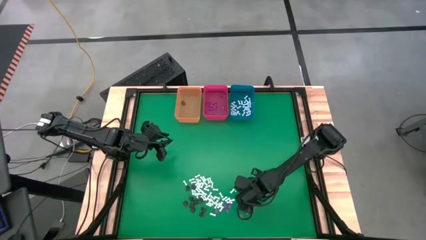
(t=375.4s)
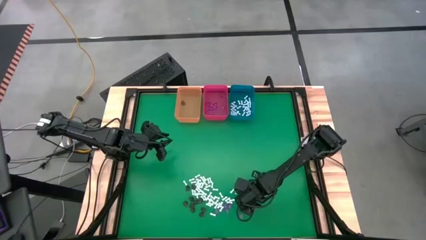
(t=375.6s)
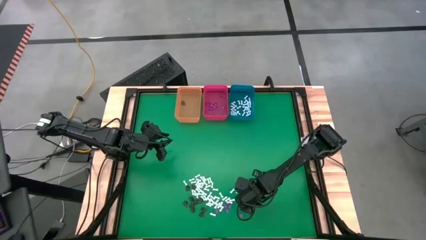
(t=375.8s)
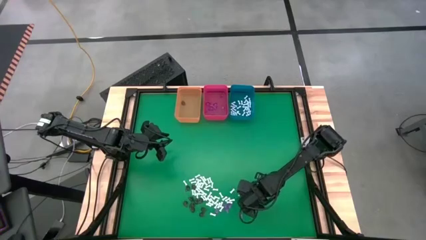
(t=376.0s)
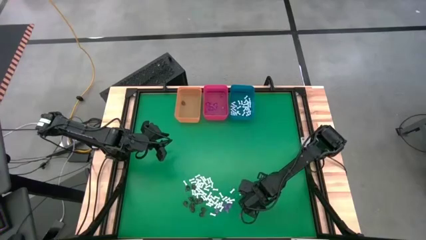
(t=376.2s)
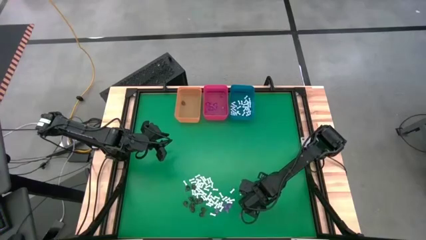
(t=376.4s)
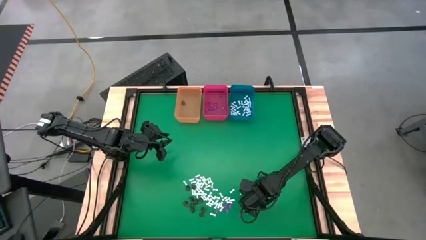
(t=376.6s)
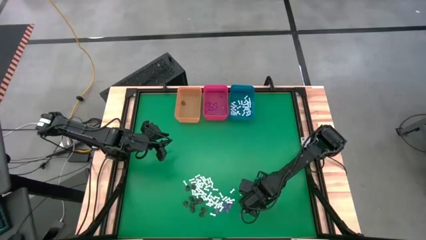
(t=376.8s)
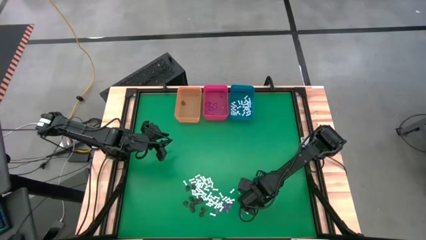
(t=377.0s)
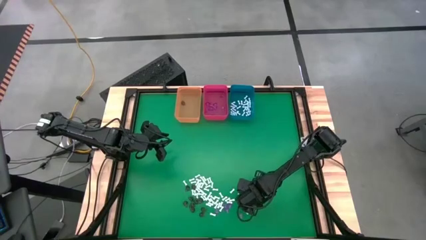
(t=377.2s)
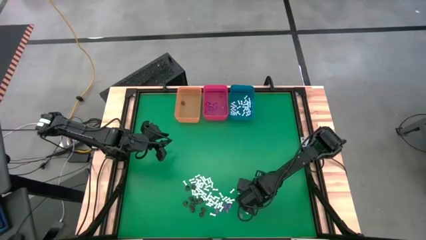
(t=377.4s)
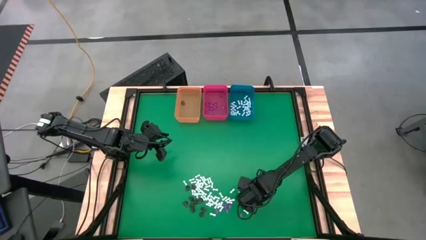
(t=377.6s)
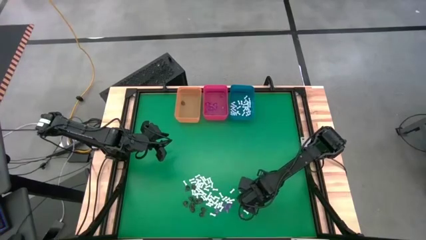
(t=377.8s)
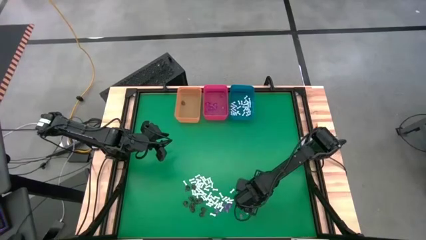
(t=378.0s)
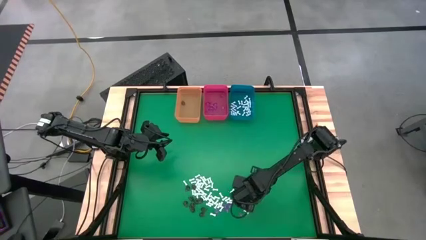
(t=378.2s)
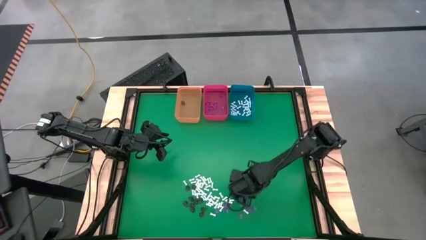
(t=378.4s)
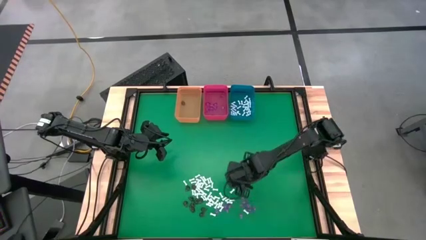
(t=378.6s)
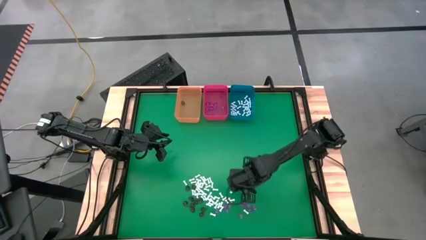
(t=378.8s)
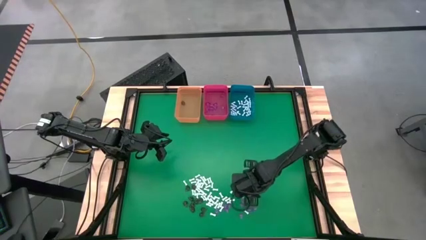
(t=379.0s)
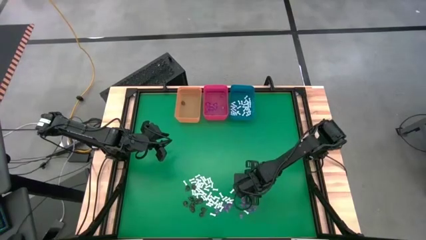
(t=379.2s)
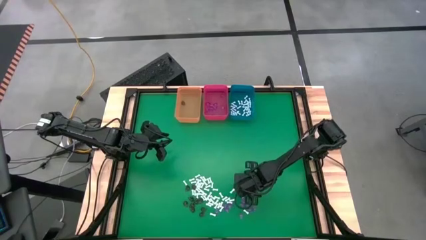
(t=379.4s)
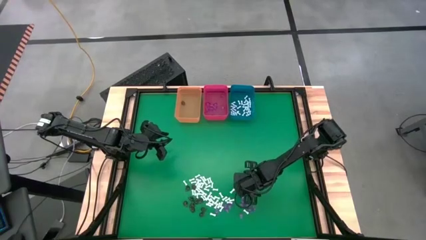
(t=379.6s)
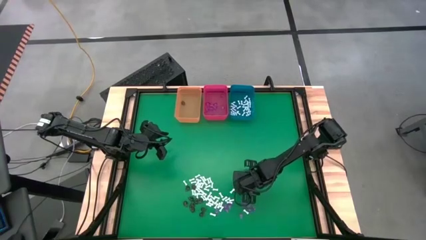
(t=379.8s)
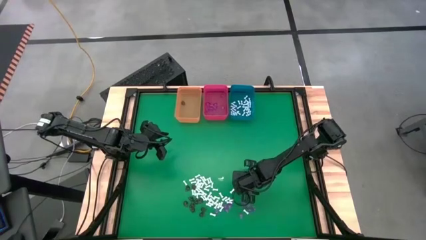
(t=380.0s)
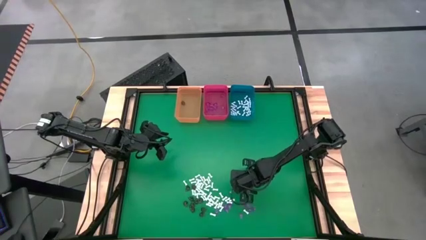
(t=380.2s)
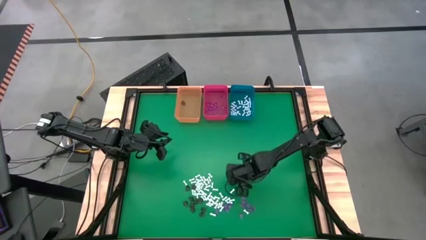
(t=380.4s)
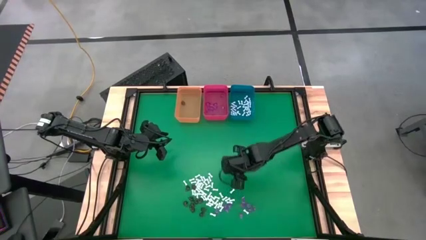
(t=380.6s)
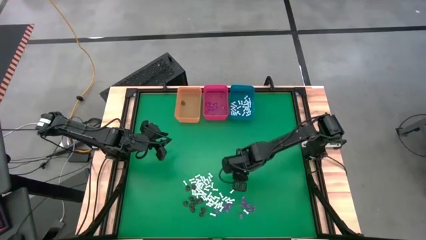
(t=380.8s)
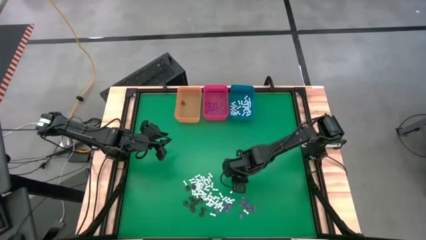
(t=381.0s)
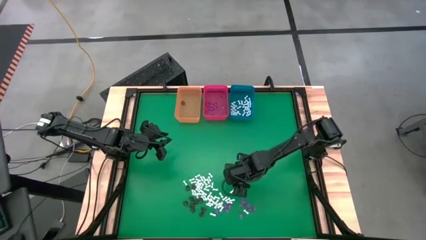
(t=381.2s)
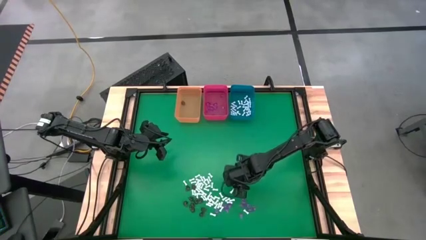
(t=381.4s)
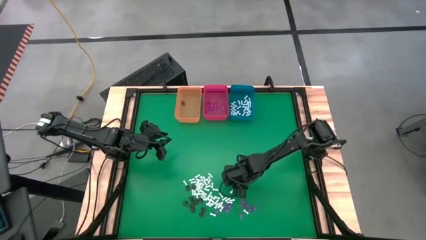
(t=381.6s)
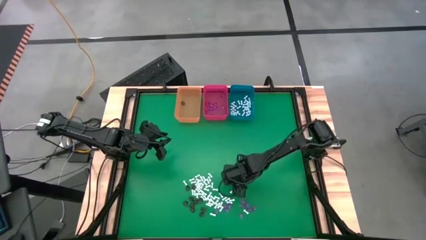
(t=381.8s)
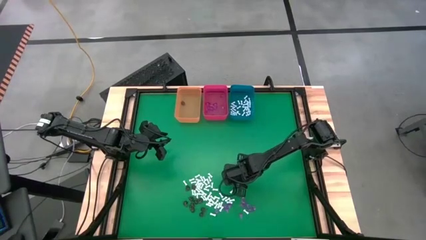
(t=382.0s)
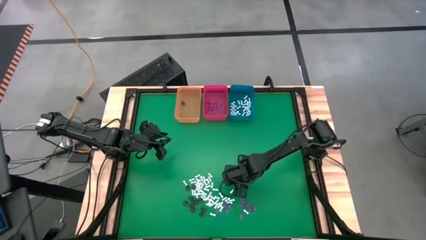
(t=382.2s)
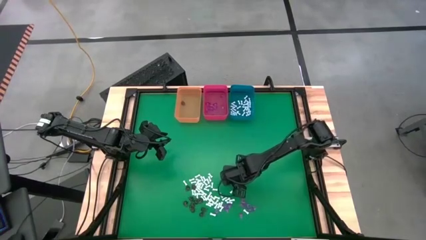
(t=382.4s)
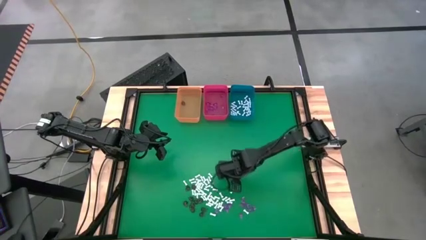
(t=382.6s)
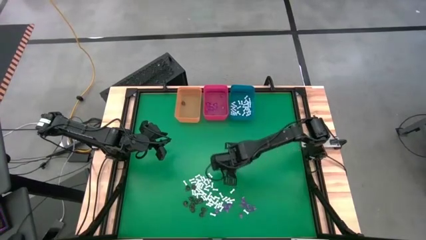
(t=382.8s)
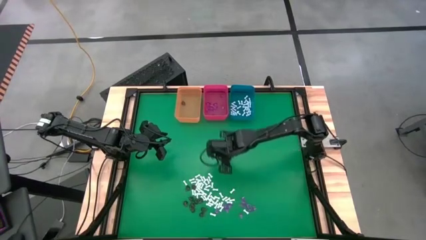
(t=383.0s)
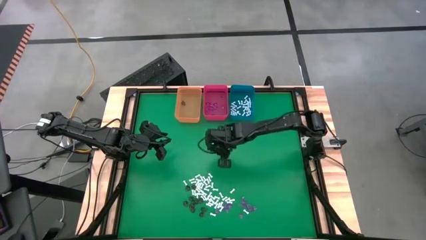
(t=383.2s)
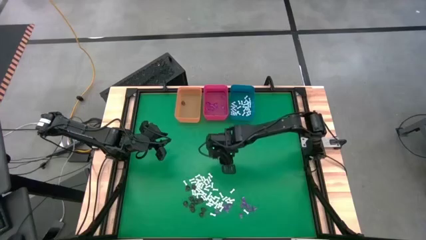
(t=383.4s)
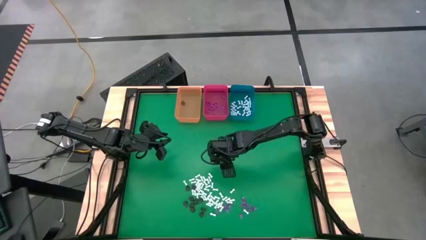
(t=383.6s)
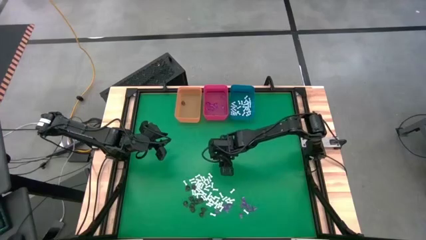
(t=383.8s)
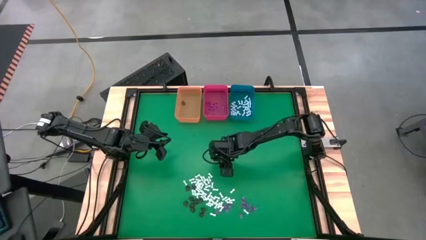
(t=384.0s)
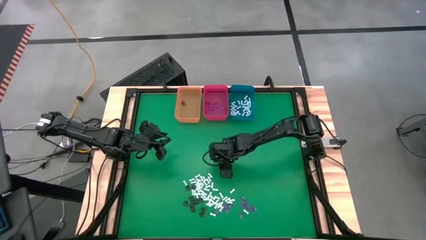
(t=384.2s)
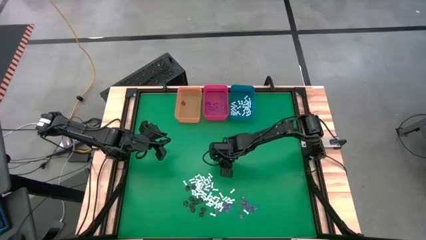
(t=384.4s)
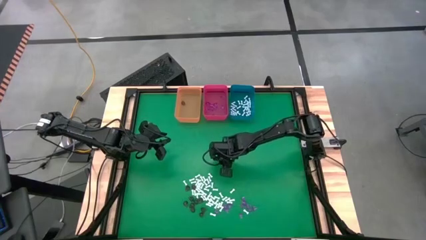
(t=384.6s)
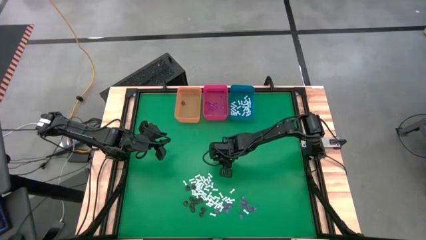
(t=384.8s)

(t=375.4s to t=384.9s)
Task: Sort Halloween decoration
Put the violet witch hat toy into the red bin

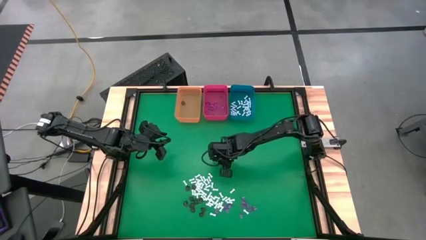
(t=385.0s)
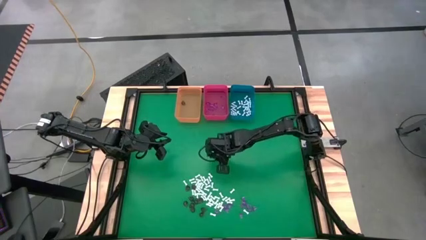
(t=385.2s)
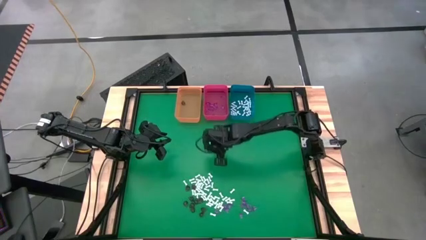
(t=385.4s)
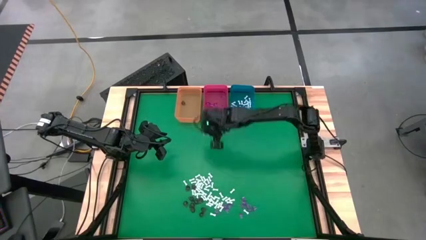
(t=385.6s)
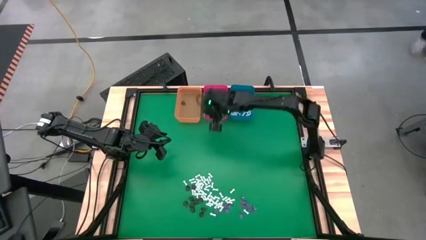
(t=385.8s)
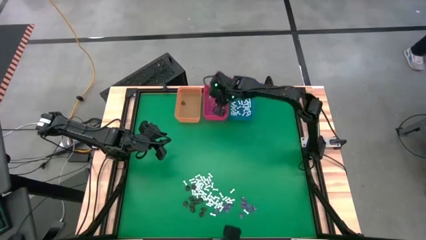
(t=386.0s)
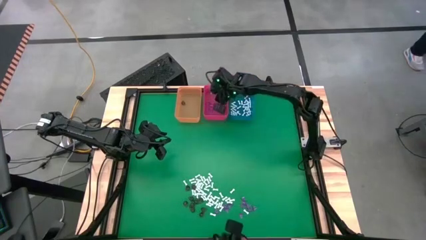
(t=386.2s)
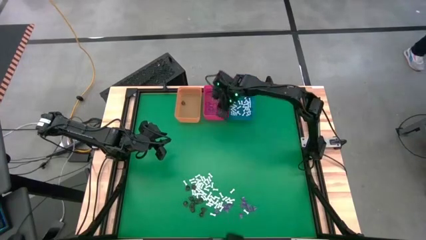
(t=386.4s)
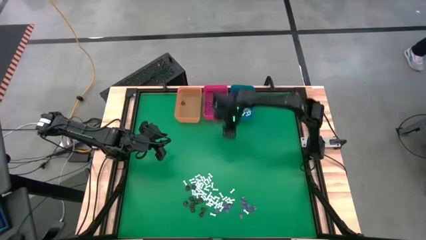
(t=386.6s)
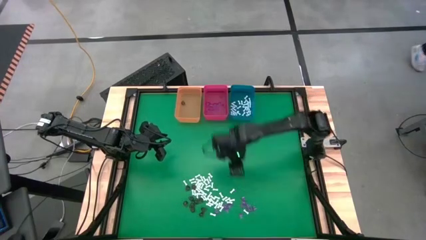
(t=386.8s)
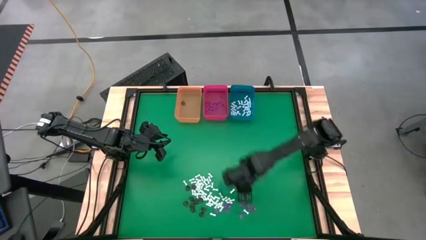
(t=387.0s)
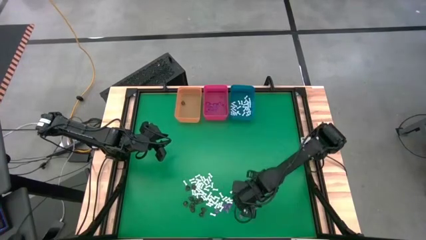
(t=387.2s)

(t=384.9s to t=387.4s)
Put the violet witch hat toy into the red bin

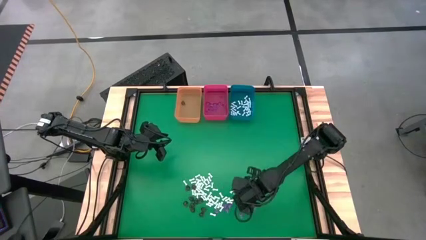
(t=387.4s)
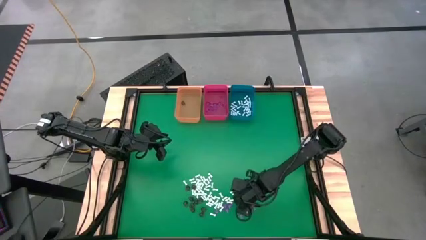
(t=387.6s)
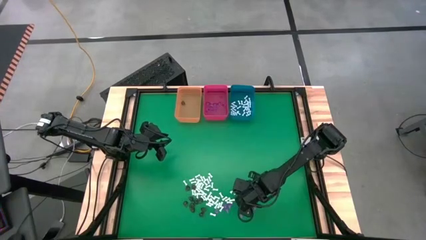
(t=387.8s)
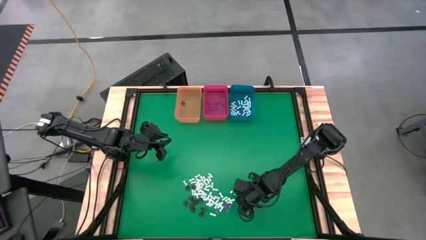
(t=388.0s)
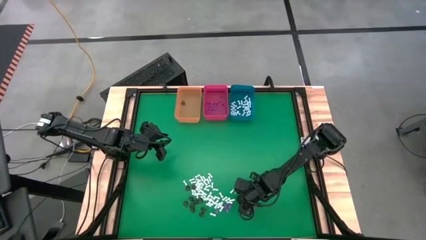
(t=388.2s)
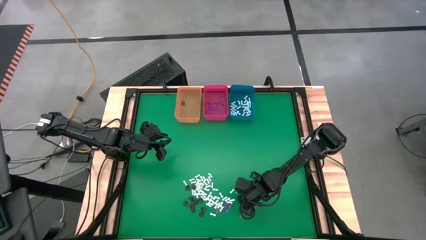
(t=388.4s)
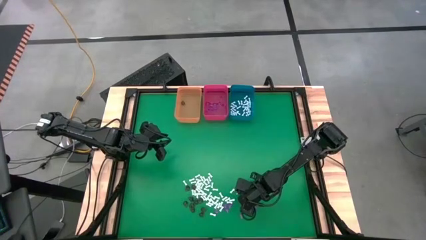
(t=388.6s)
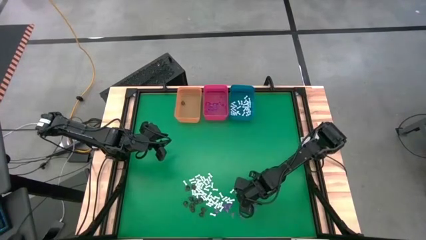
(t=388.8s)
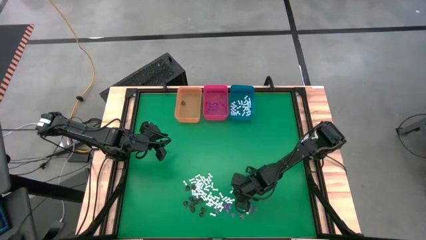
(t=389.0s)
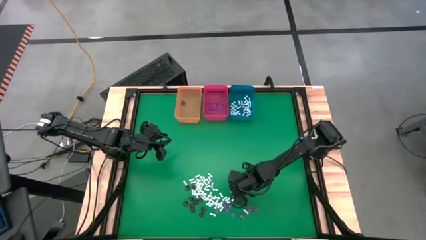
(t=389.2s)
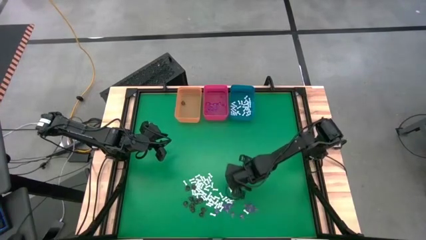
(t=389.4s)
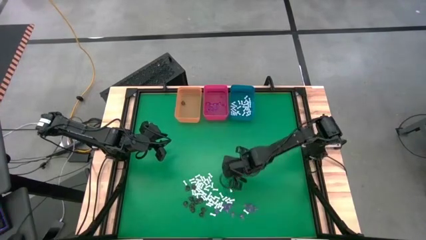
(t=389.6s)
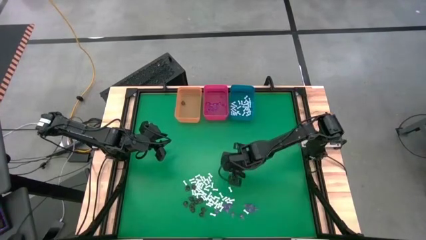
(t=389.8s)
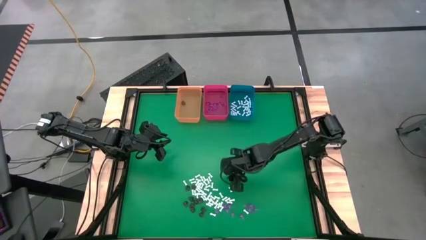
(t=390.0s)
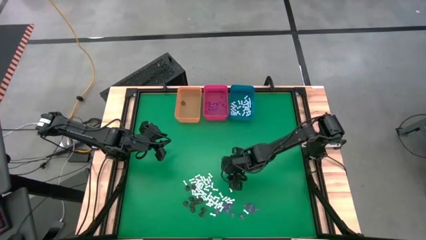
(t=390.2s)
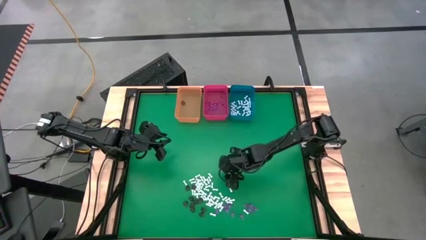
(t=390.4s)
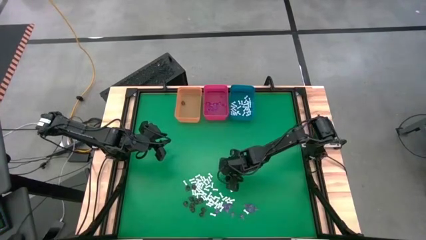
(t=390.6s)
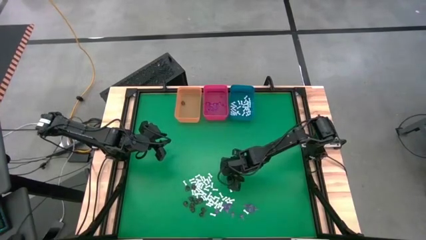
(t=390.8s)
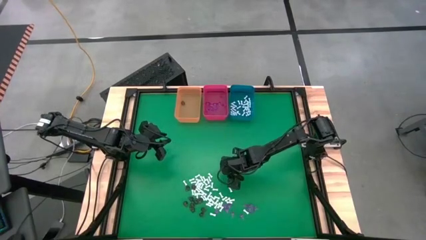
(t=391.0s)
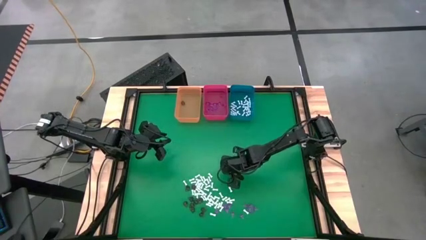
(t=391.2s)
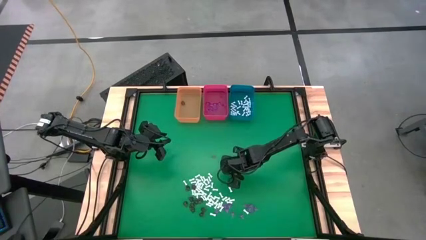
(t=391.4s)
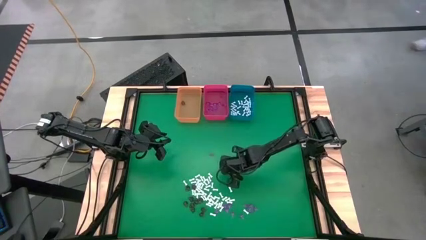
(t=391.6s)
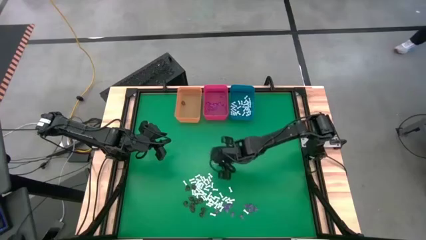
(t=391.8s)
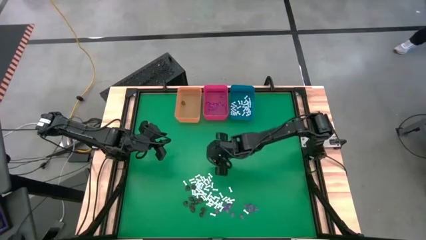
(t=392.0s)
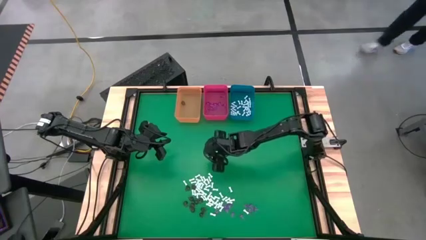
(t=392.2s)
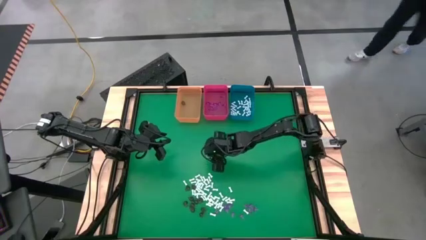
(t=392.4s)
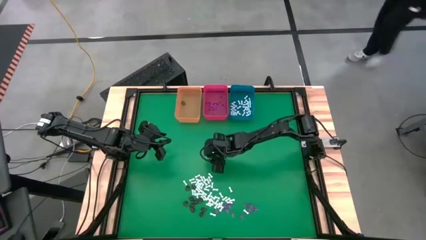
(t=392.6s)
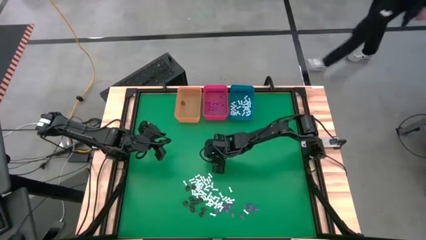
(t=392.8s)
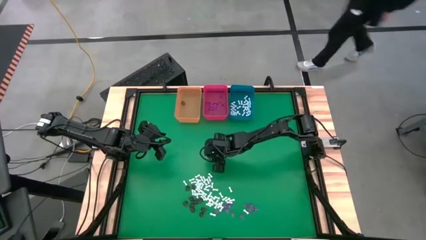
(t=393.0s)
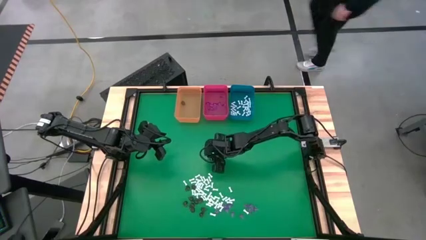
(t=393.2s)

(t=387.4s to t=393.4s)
Put the violet witch hat toy into the red bin
